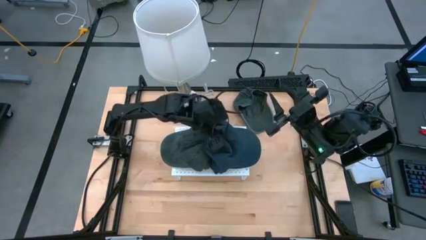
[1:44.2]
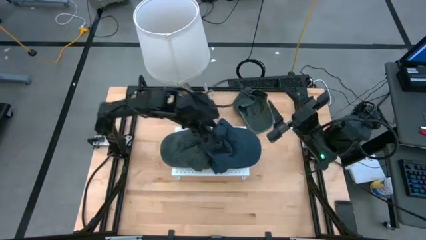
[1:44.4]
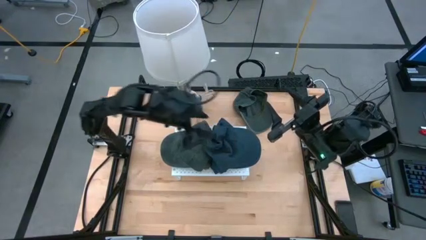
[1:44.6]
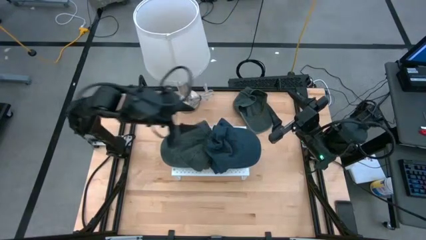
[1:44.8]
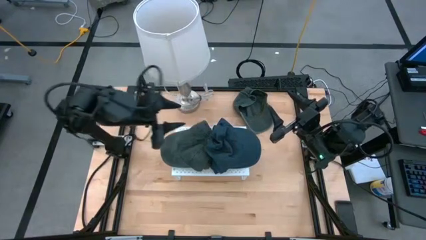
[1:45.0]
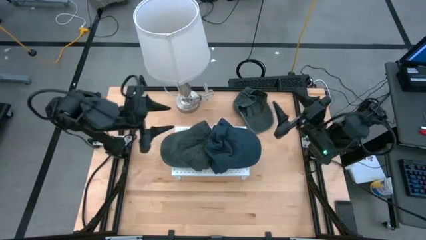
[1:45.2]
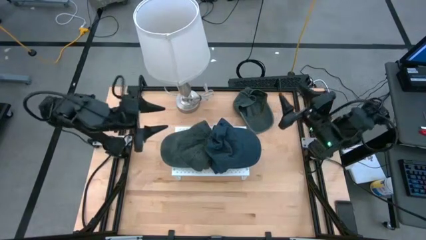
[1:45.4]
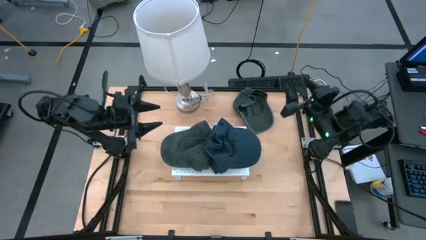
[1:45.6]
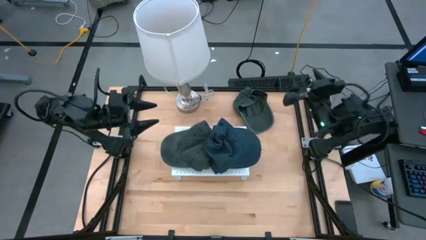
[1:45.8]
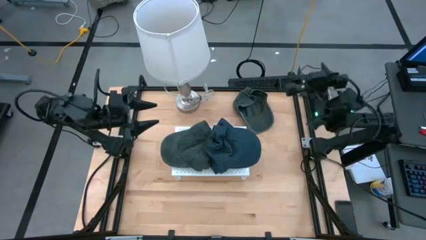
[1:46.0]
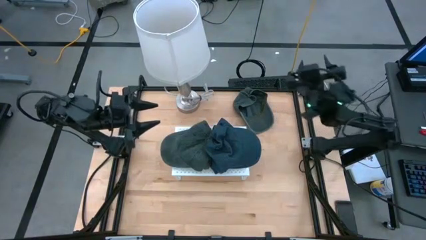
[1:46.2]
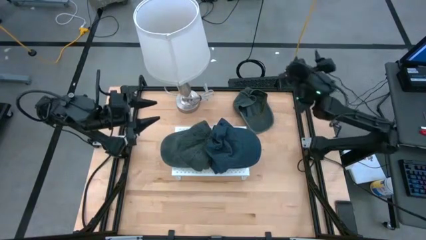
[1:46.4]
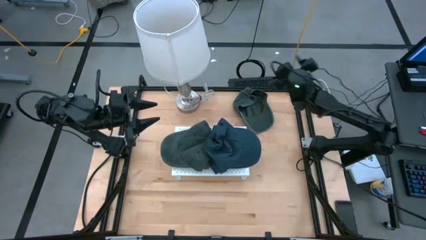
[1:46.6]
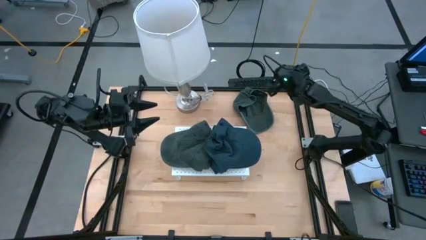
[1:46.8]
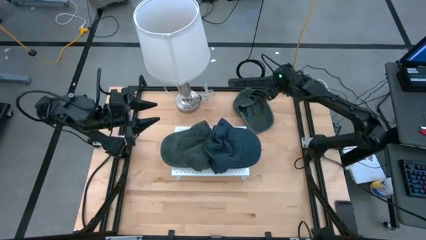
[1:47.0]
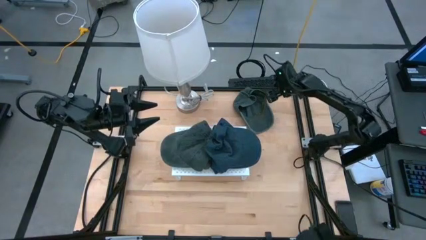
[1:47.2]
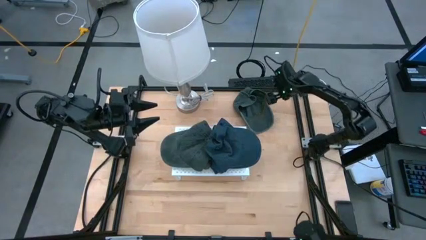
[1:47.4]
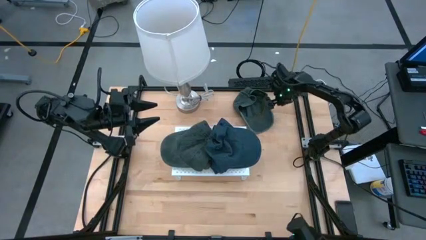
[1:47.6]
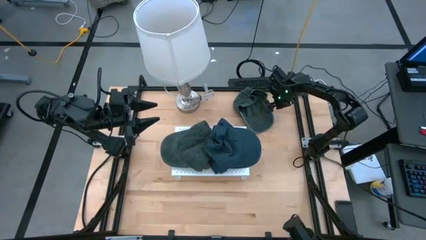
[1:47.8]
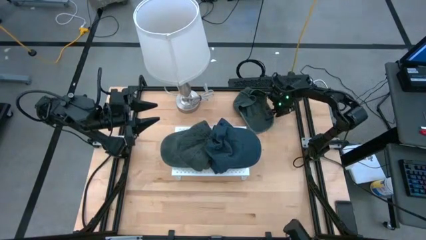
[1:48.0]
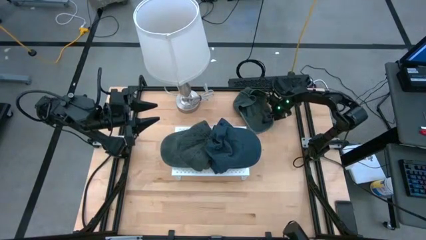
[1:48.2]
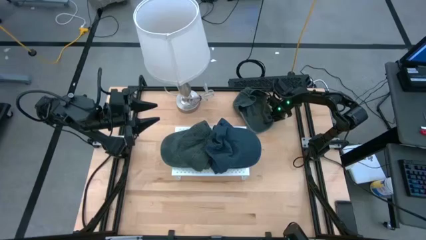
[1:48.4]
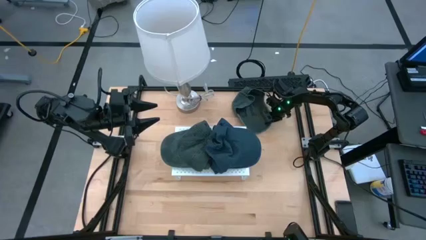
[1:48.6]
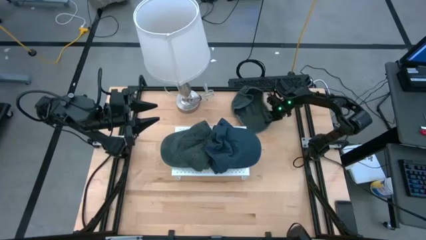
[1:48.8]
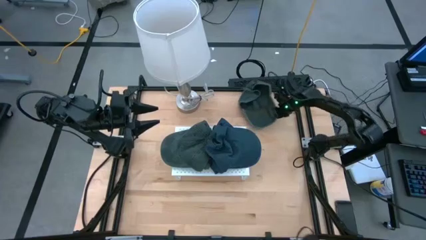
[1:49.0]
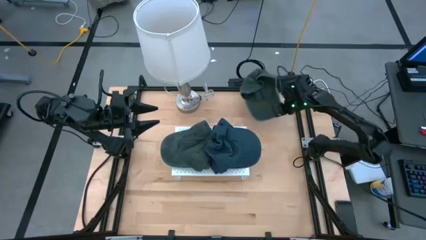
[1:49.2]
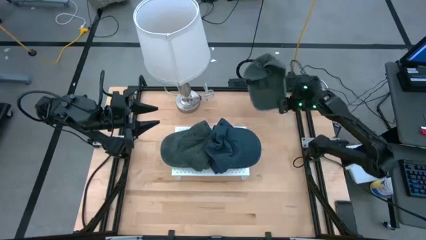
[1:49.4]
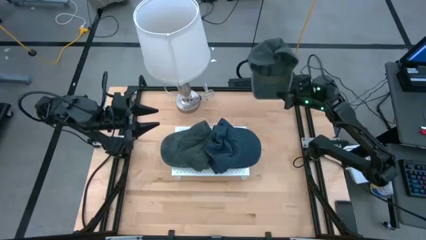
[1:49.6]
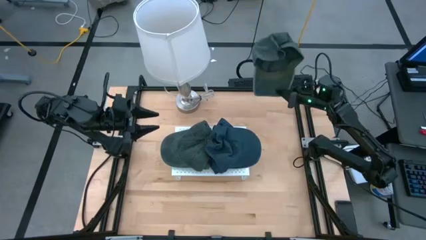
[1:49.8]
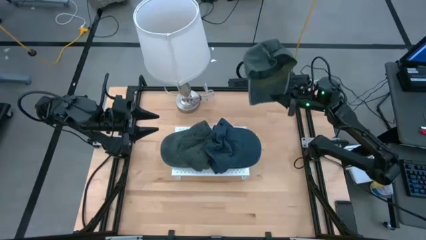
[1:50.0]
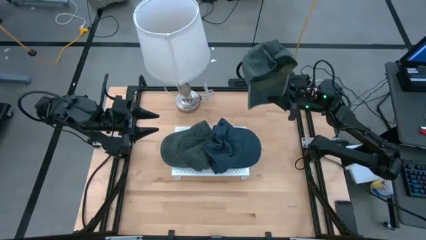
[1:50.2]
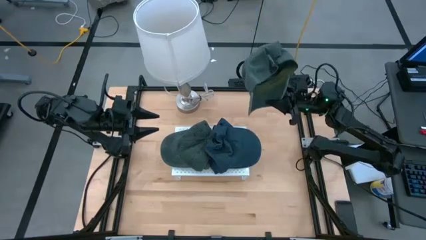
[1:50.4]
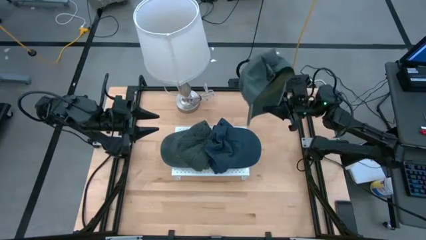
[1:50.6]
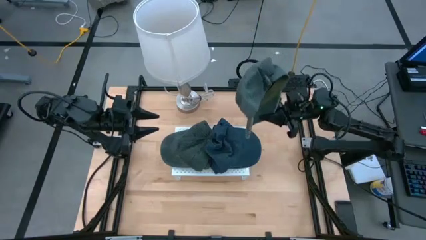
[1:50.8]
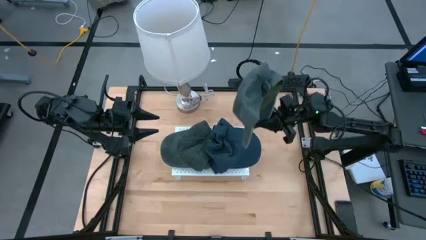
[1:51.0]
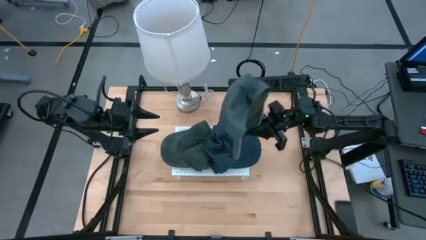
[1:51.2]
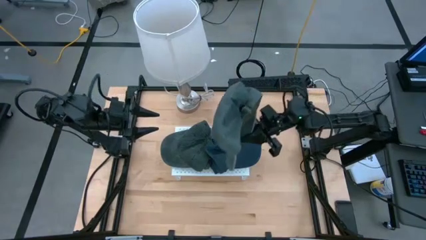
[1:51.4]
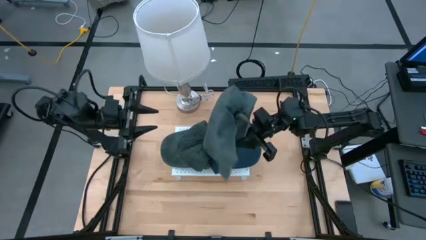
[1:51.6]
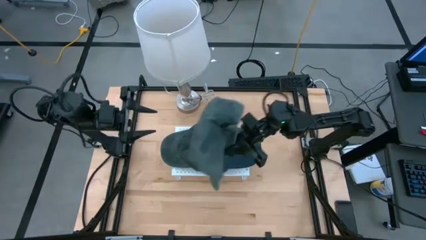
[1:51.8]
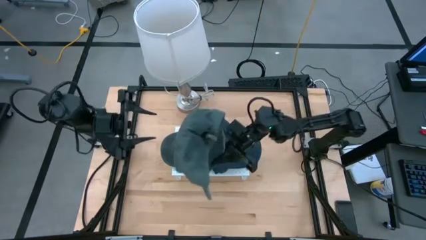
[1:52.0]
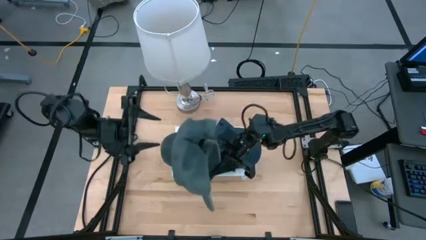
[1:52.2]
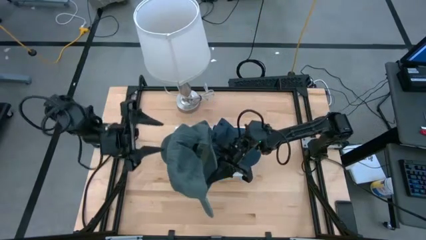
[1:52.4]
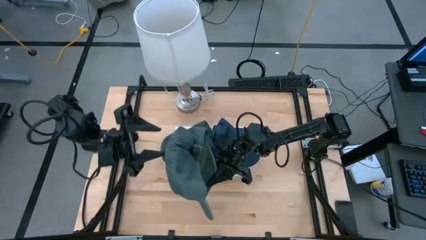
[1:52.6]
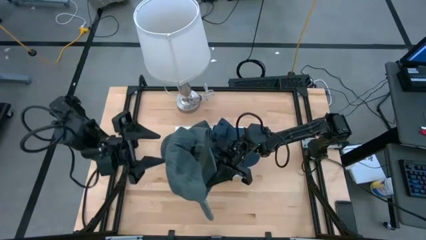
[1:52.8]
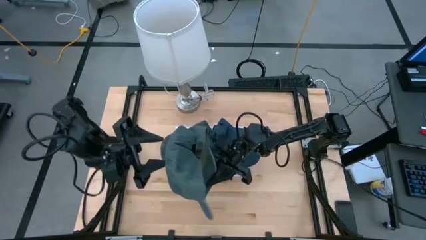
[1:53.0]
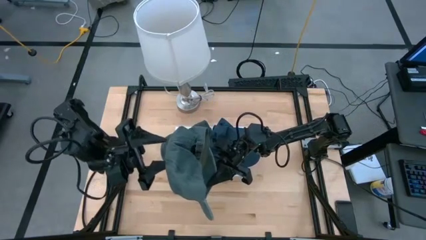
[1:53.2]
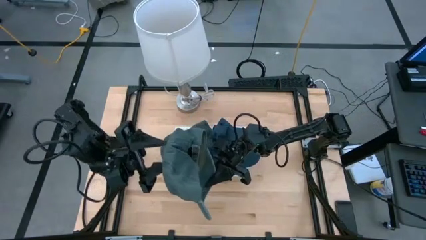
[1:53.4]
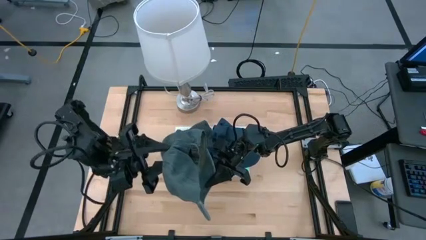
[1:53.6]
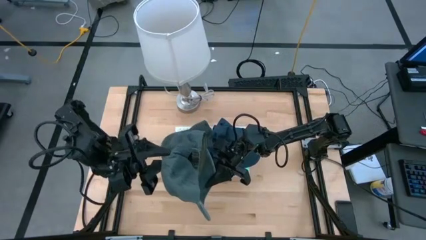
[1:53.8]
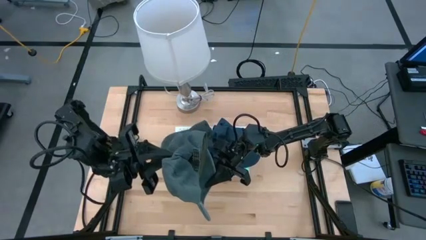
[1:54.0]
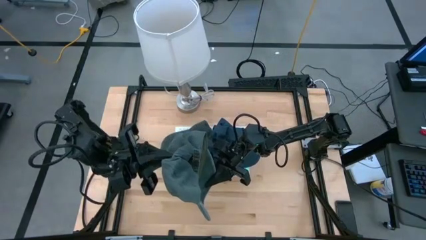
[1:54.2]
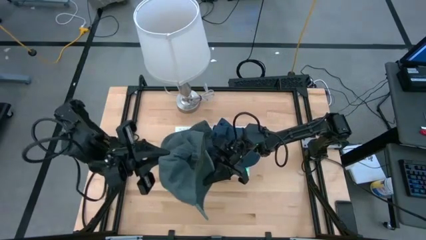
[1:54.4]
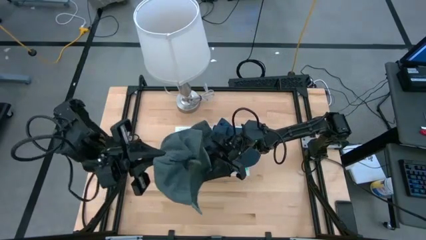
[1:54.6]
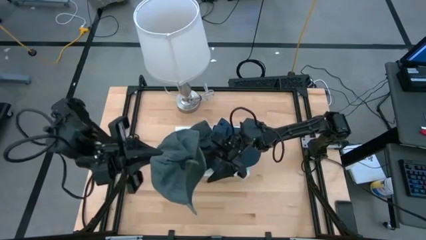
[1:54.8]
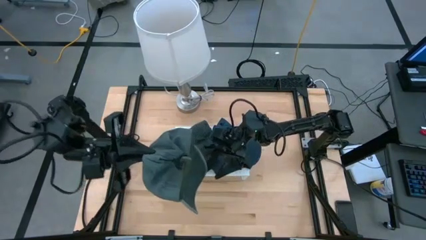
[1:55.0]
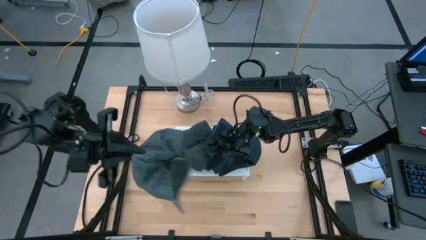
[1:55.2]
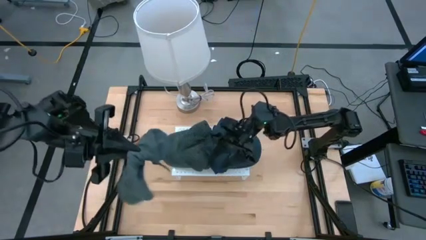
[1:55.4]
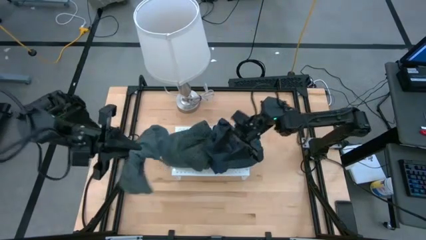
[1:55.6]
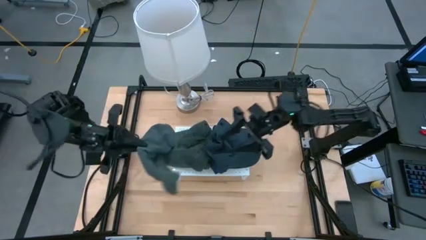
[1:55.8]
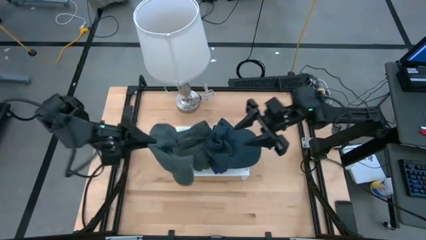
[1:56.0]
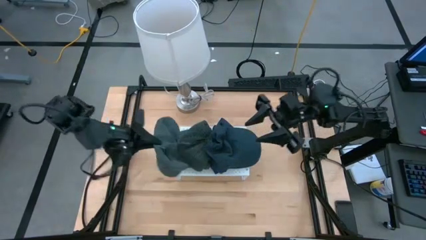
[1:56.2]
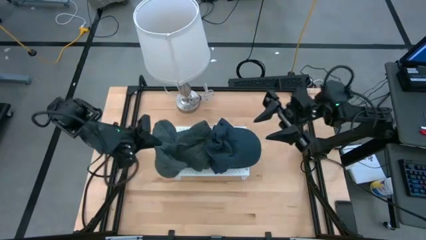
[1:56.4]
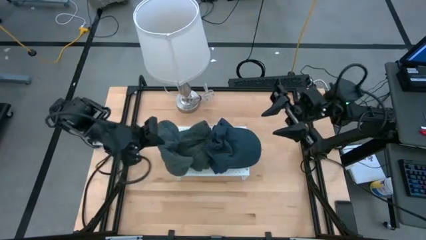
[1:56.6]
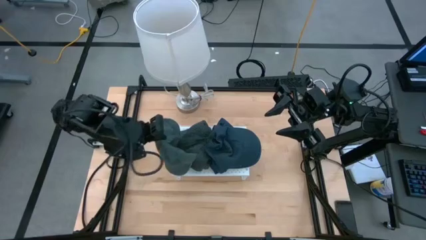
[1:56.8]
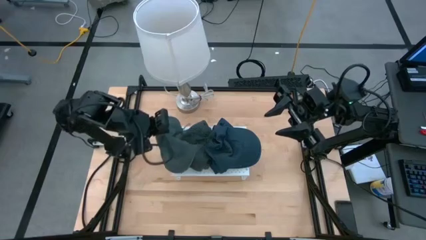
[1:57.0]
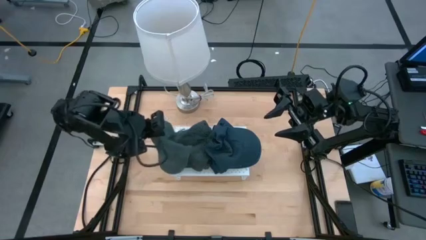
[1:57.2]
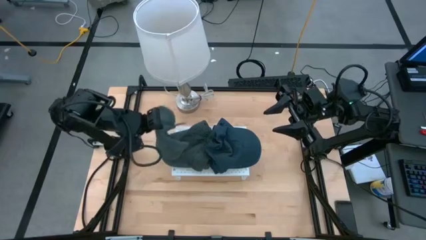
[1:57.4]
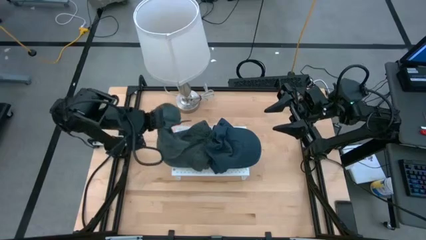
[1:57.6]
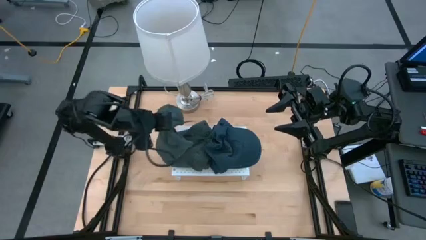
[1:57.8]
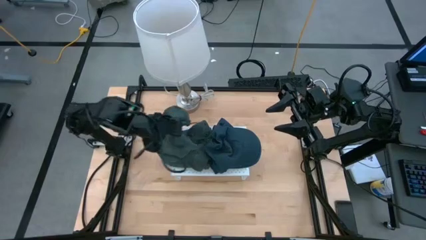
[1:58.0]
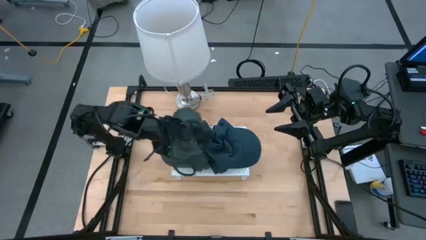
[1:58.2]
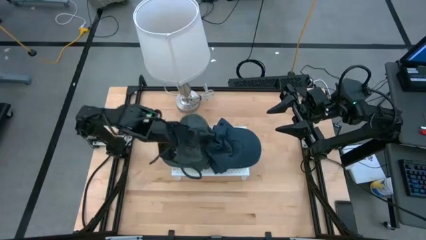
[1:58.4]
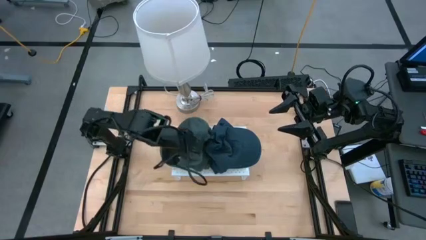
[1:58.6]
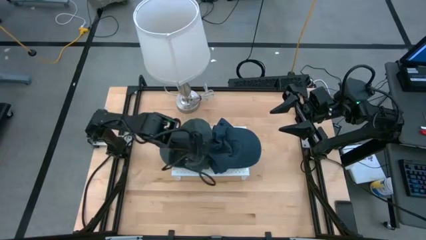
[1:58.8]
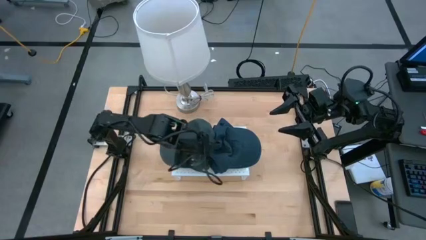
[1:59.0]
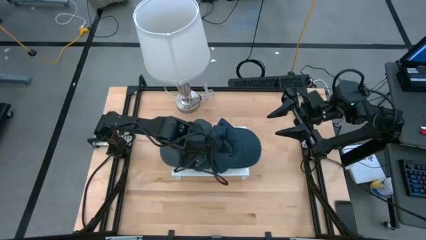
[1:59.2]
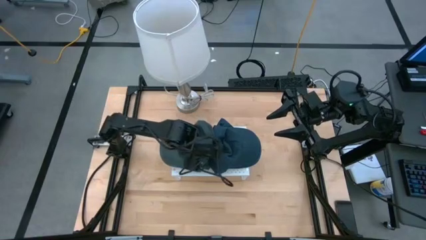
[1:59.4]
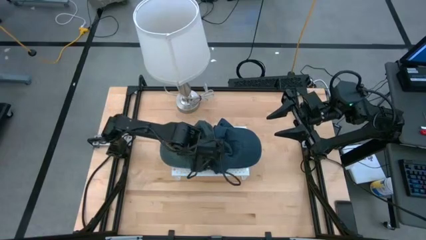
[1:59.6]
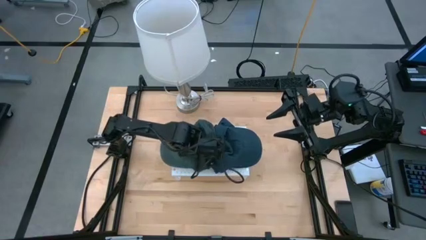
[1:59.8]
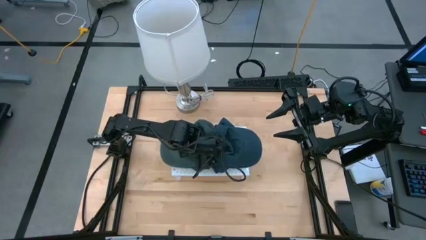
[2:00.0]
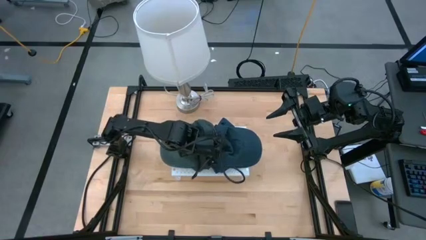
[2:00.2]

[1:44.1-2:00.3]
Task: Pick & Place hat
Stack the black cap on top of the other black cap on the shelf
